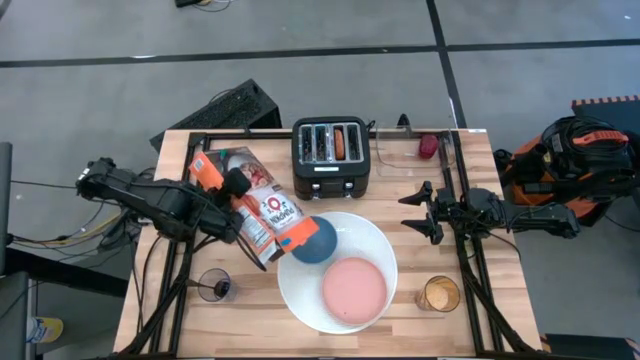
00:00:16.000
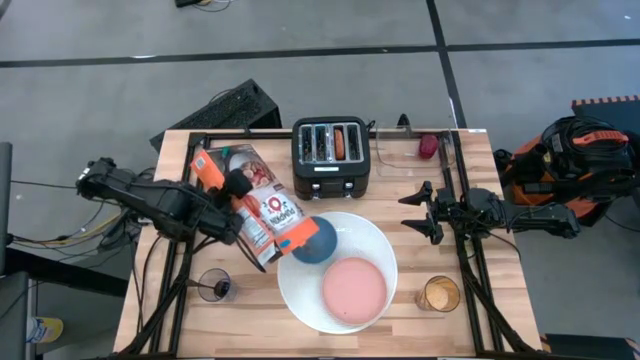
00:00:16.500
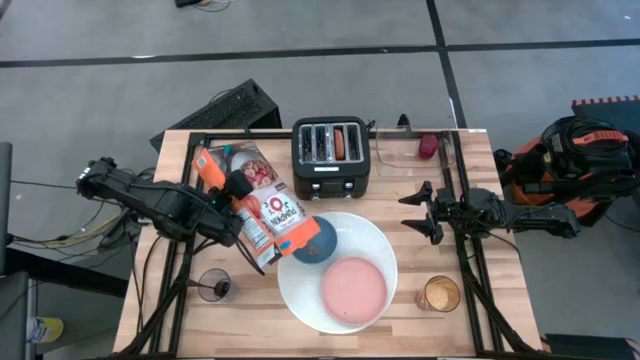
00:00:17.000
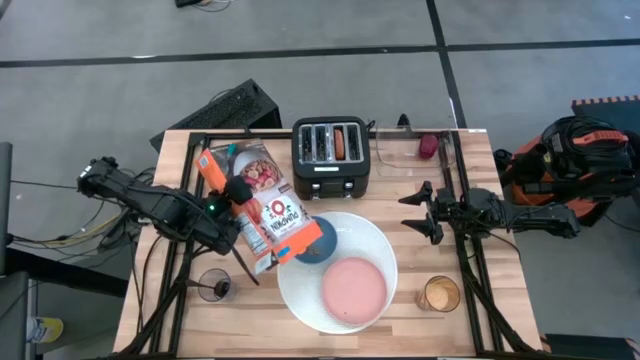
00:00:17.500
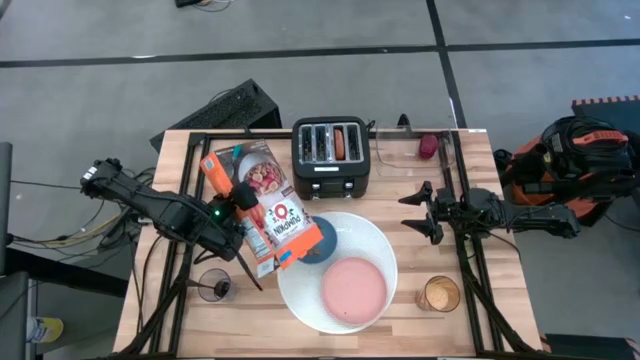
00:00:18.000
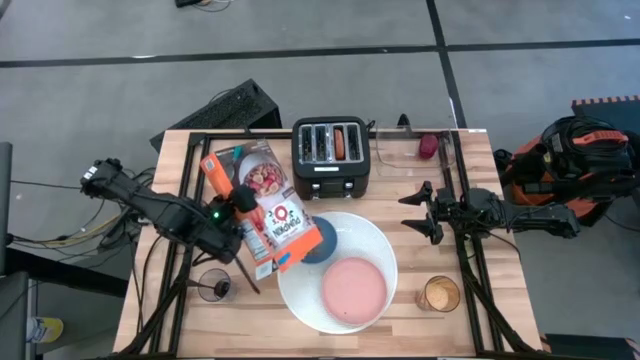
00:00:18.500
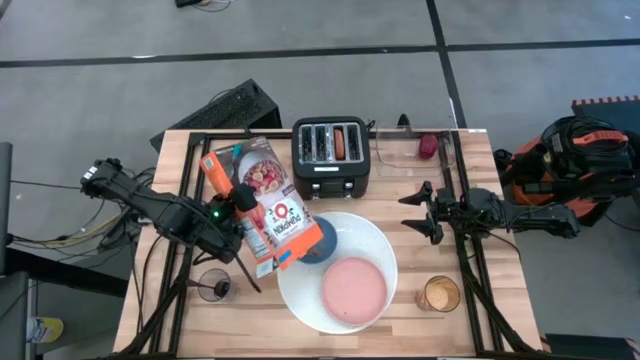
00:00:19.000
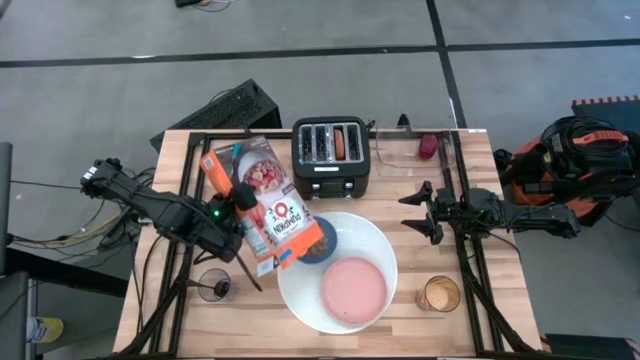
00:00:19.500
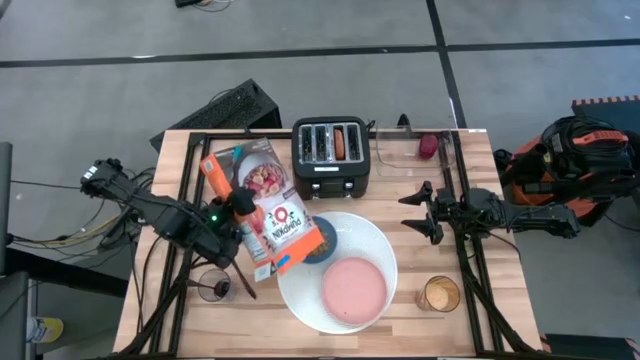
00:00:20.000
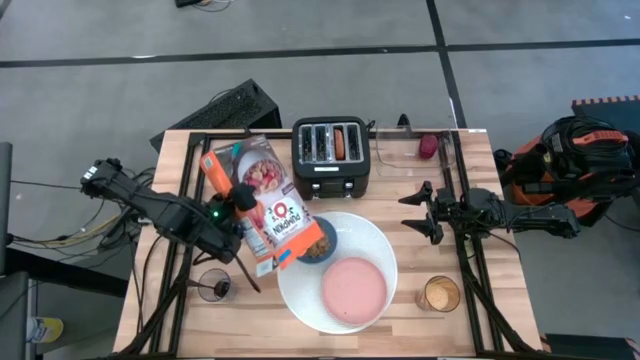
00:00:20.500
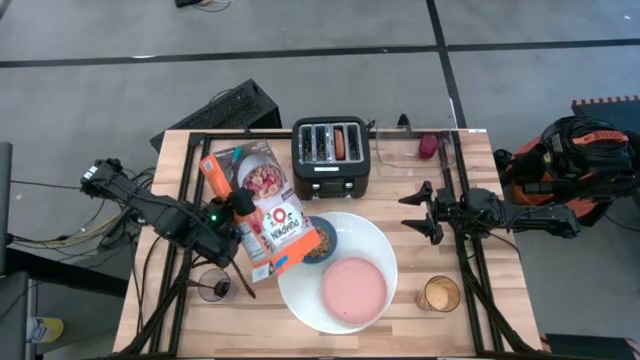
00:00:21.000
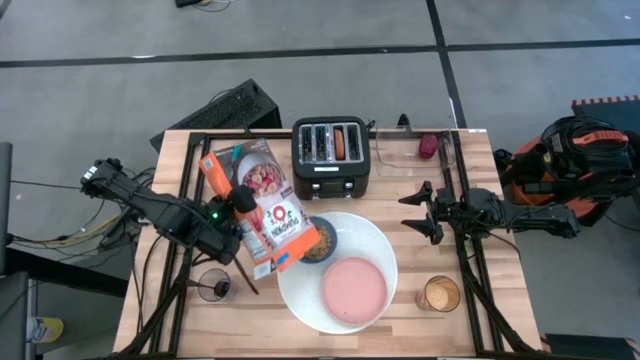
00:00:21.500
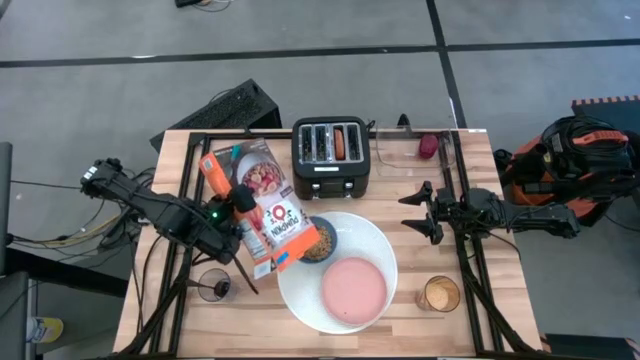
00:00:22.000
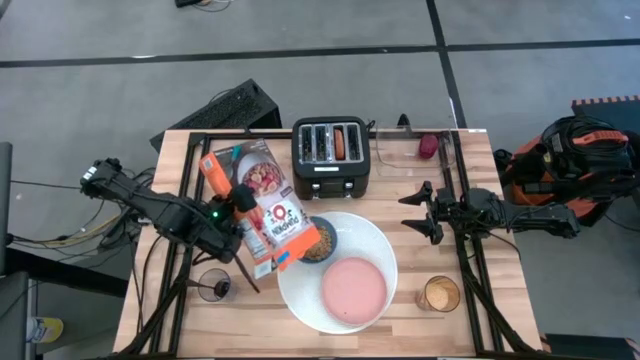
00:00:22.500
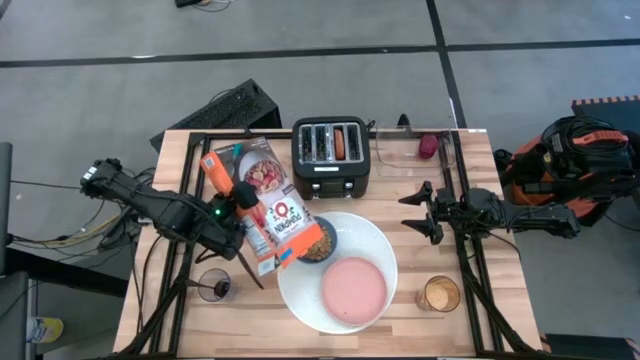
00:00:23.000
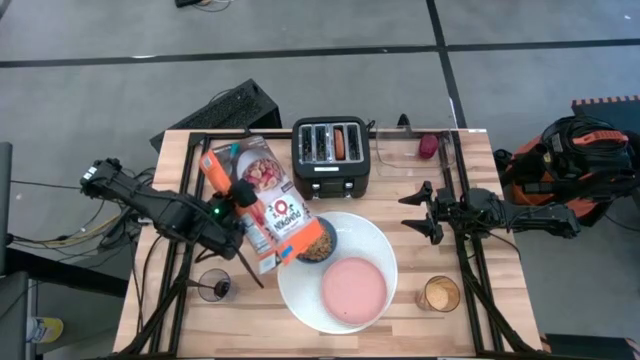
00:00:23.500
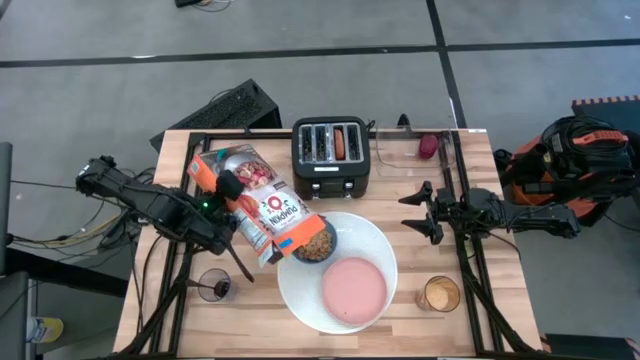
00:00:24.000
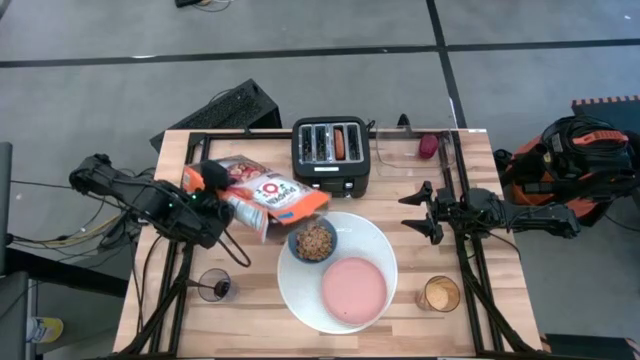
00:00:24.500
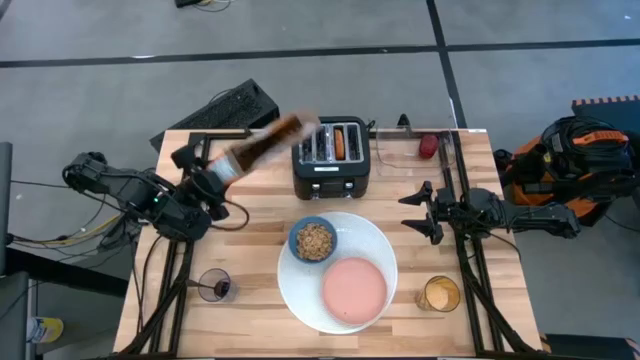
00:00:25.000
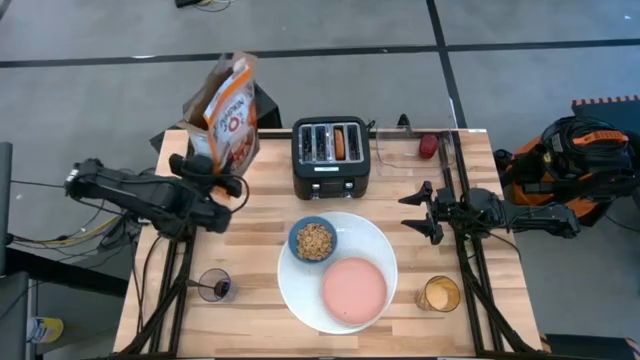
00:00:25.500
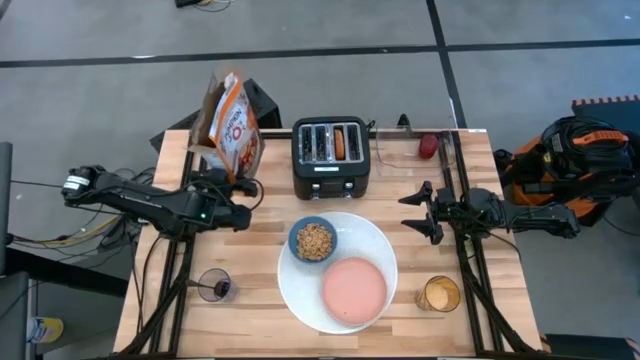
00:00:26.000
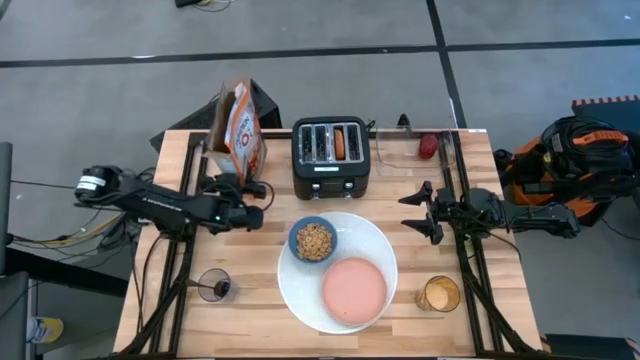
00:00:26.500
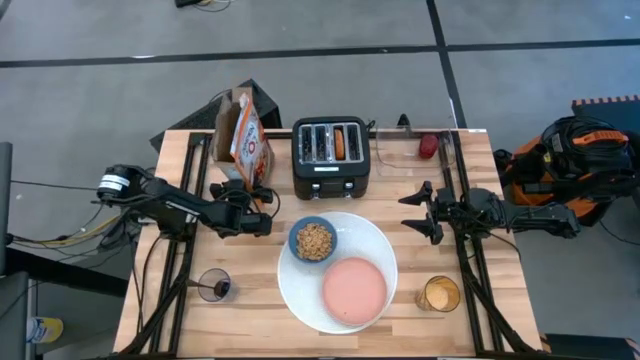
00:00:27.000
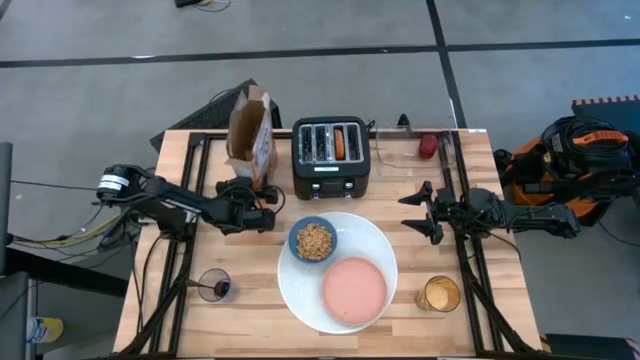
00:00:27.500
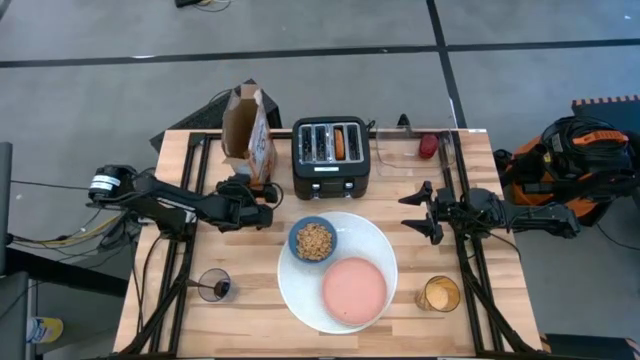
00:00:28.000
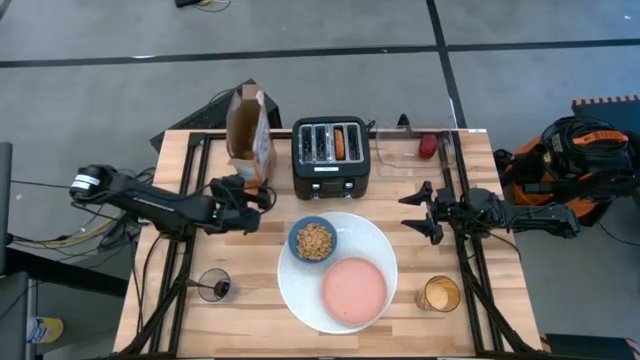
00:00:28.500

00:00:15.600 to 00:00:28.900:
Task: Arrange a breakfast setting
Pour the cereal into the blue bowl

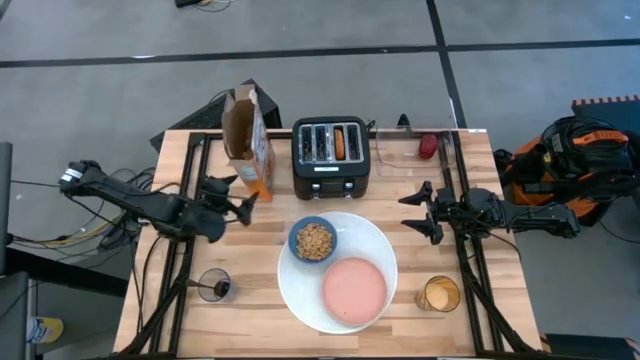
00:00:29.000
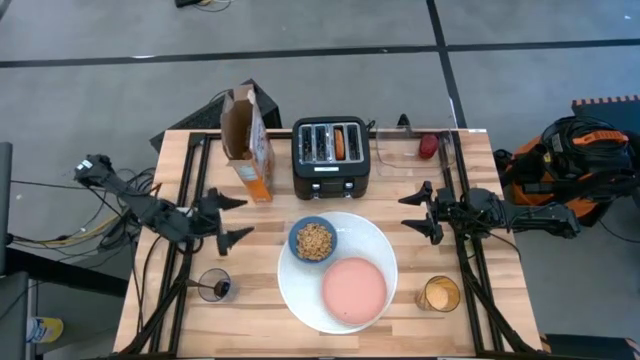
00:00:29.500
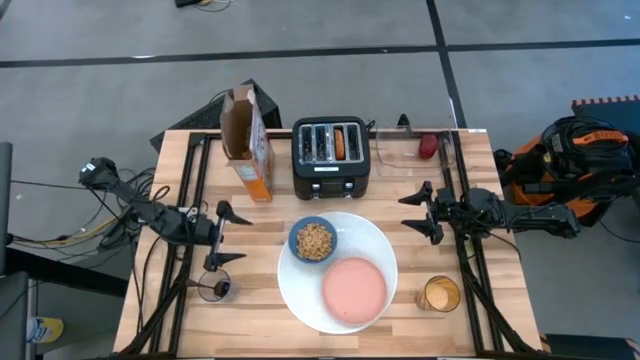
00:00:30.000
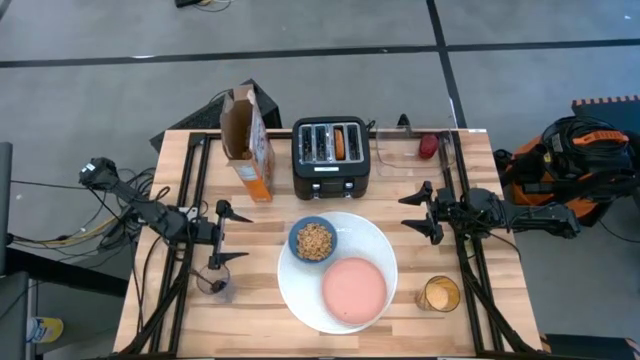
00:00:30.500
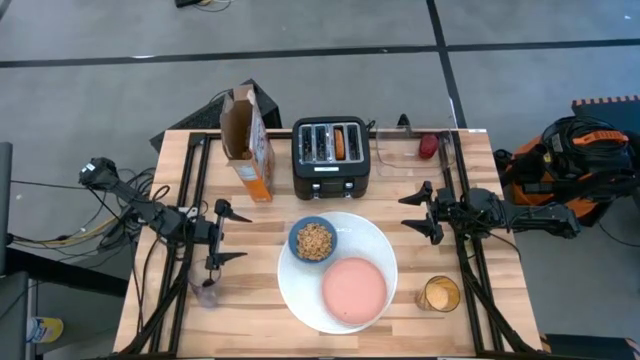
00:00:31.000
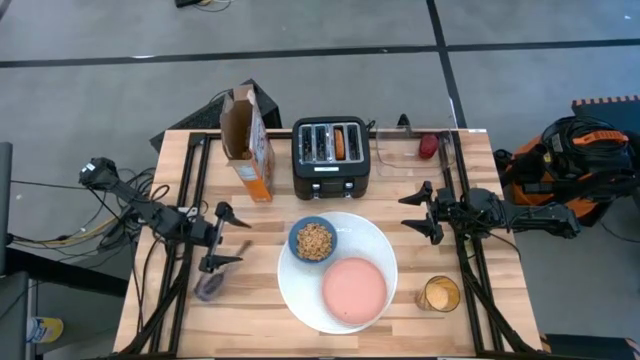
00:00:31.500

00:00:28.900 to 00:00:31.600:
Put the black spoon to the left of the blue bowl

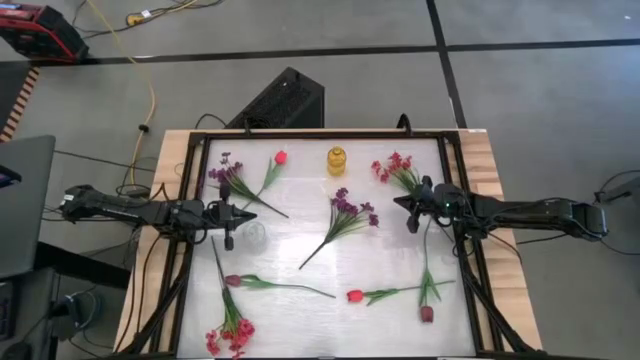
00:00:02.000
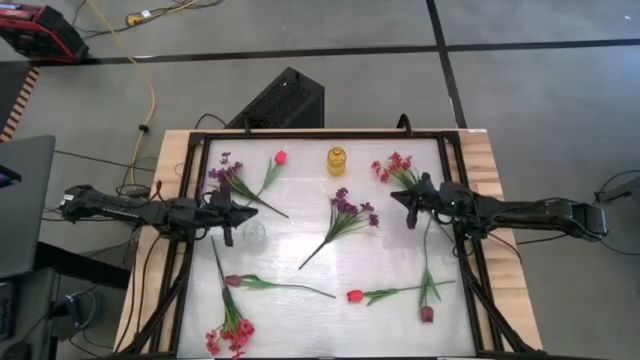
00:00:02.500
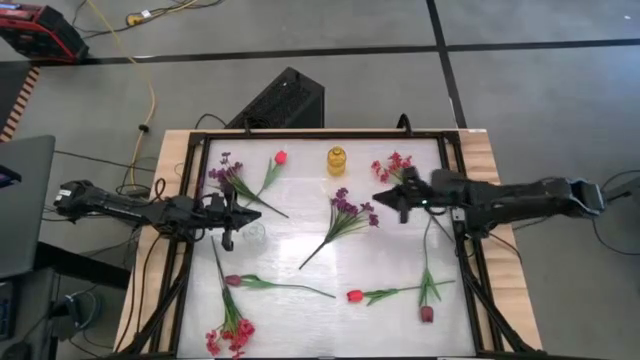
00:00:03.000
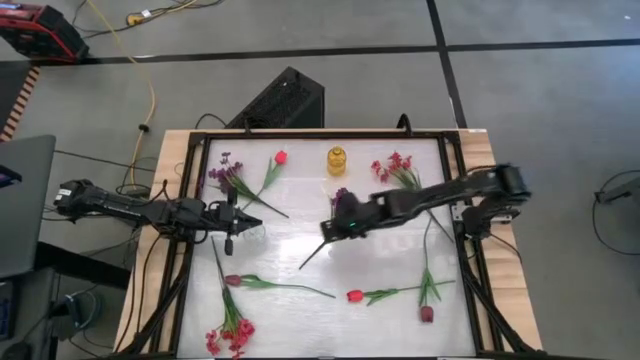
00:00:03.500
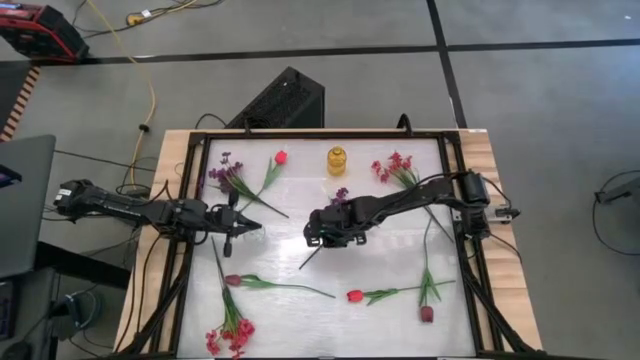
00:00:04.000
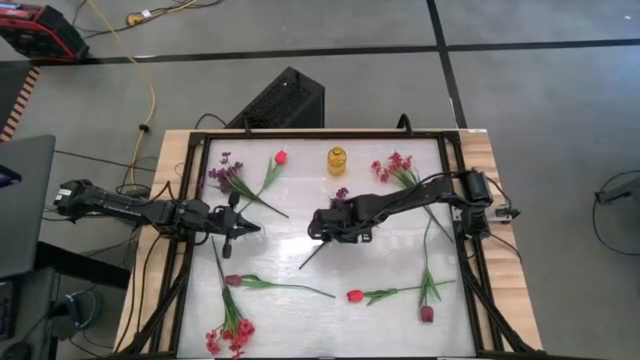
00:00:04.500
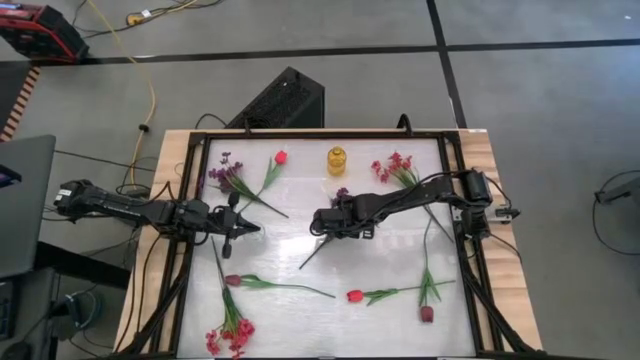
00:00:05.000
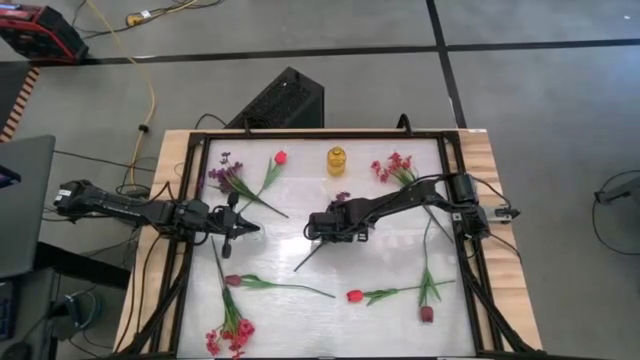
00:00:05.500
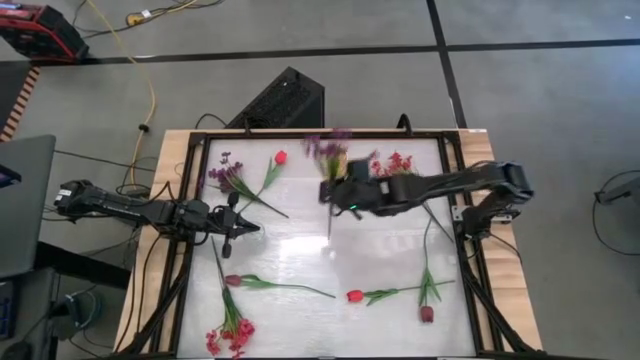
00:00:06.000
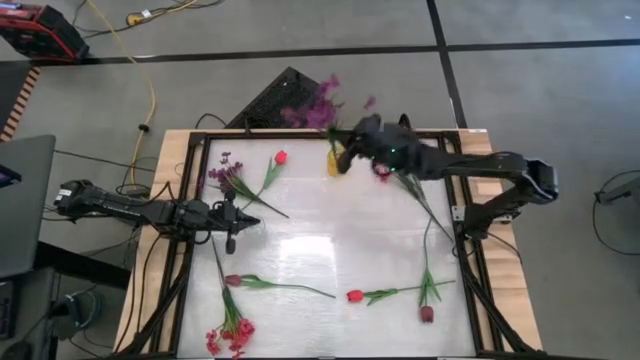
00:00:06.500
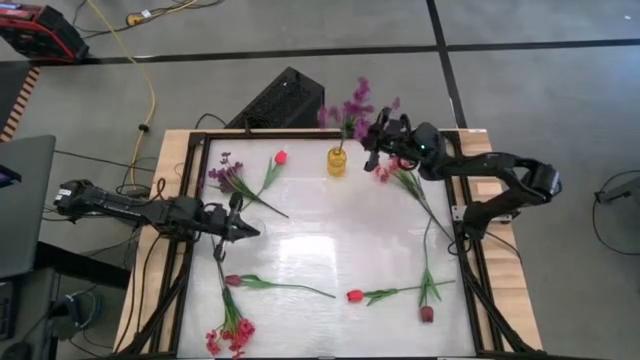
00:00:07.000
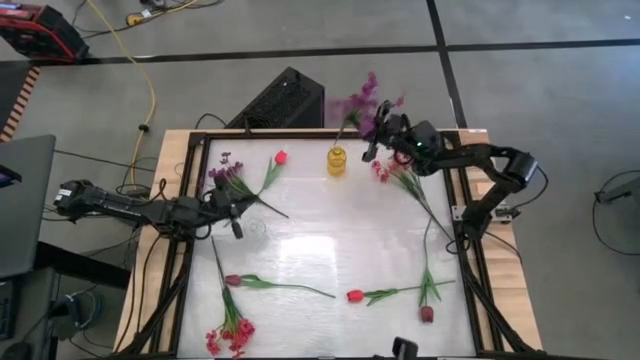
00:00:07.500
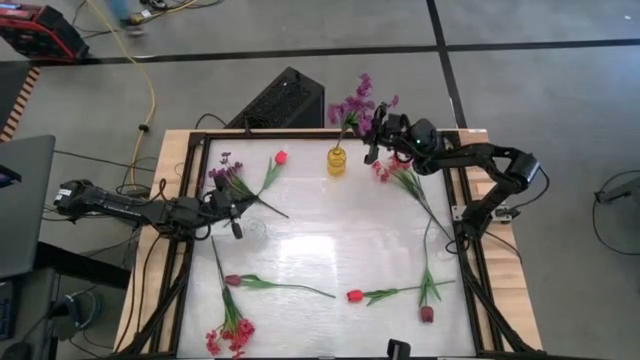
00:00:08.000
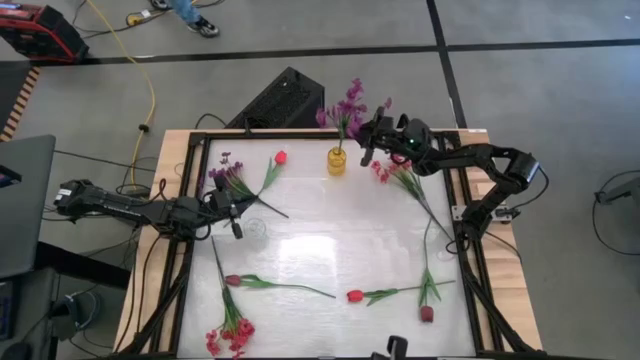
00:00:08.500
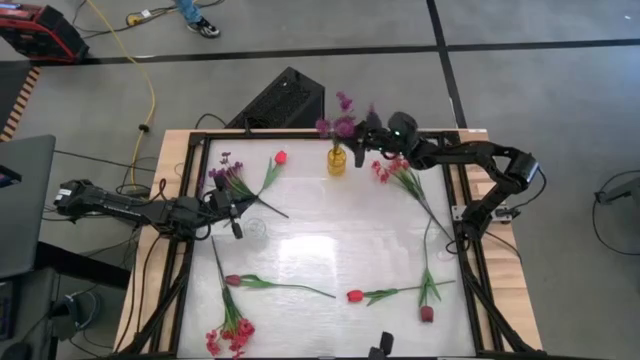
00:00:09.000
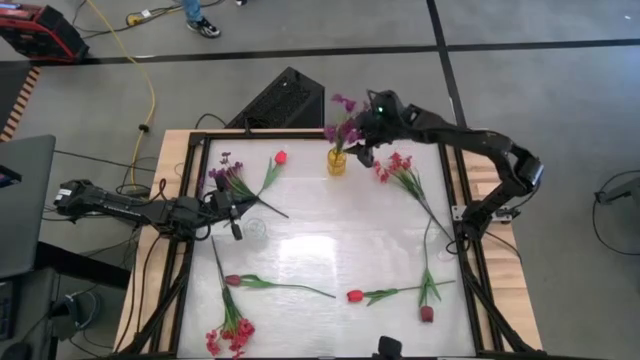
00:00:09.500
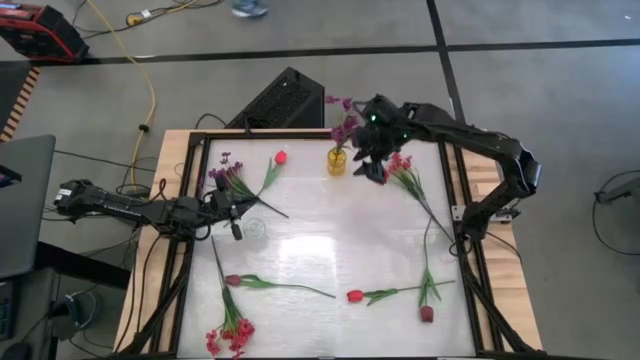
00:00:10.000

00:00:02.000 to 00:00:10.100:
Task: Sort flowers into vase by color
Put the right violet flowers into the yellow vase
